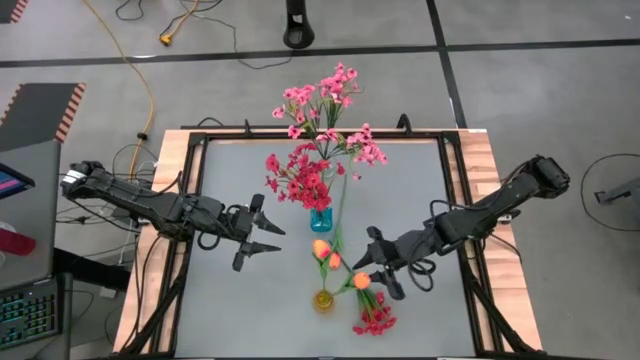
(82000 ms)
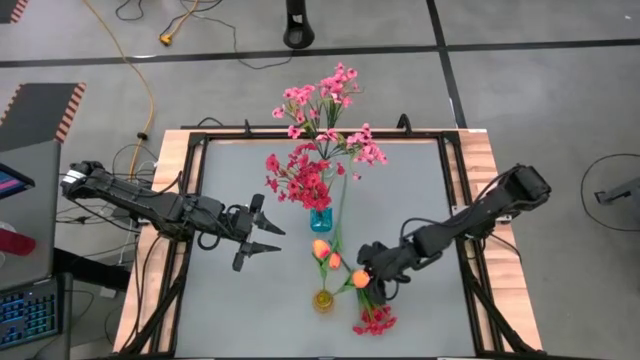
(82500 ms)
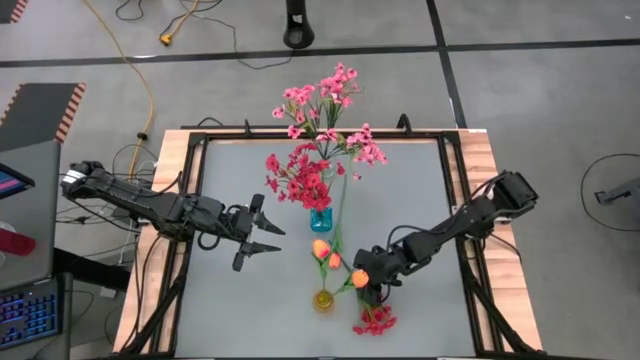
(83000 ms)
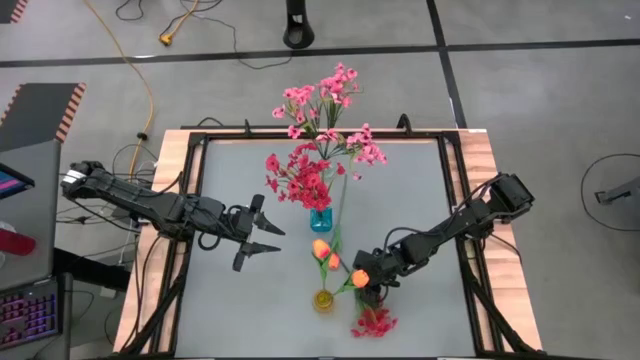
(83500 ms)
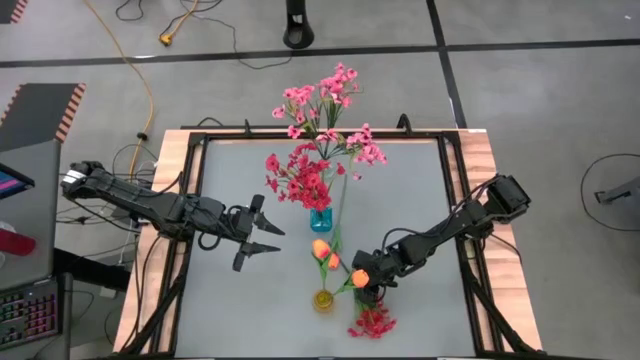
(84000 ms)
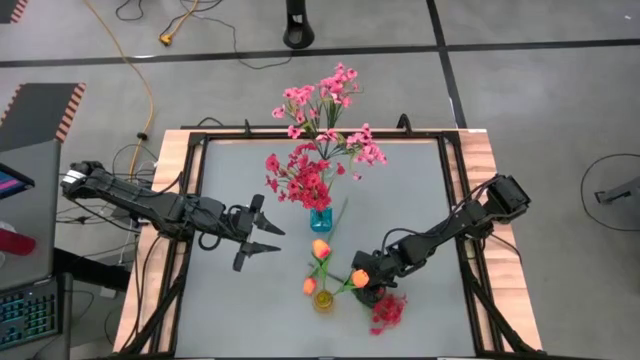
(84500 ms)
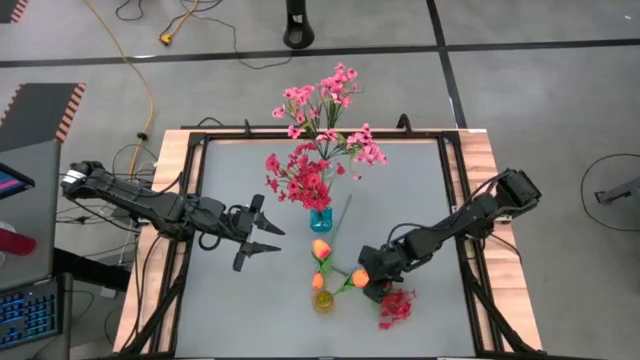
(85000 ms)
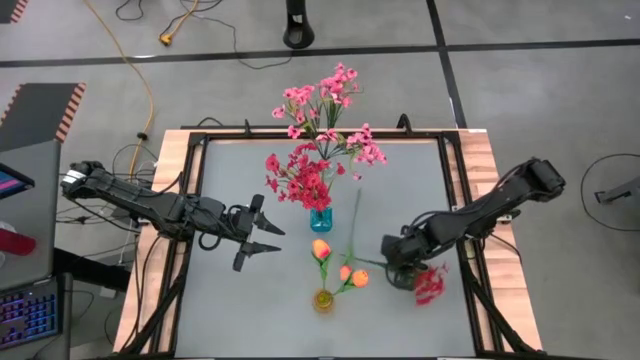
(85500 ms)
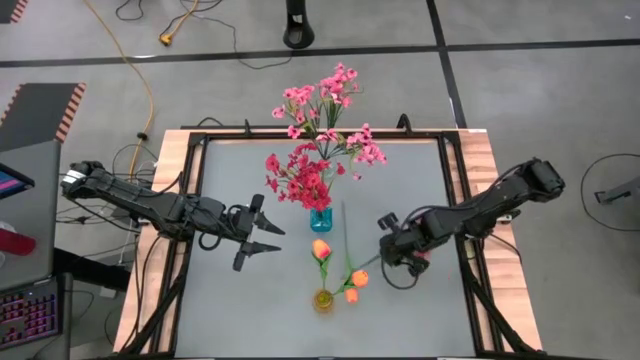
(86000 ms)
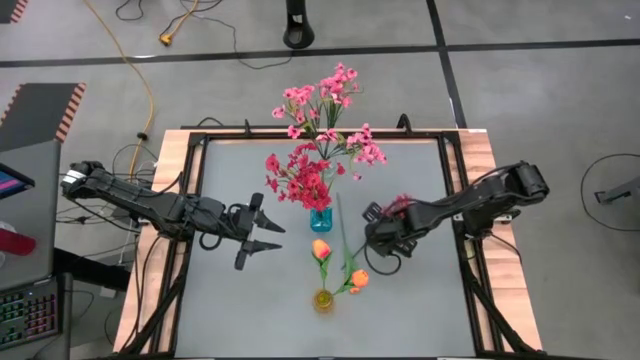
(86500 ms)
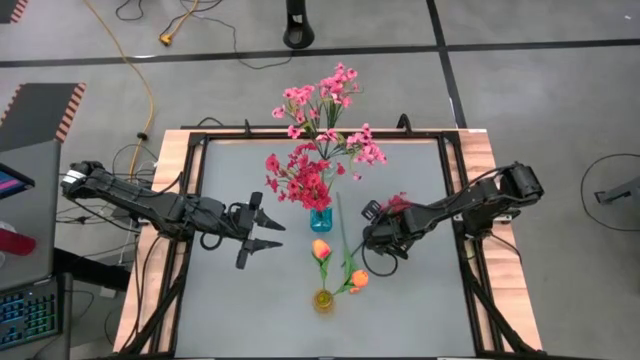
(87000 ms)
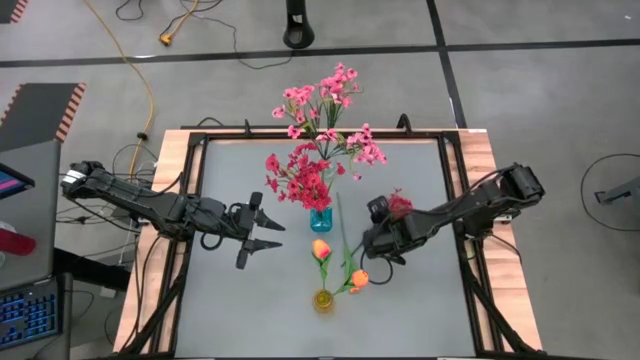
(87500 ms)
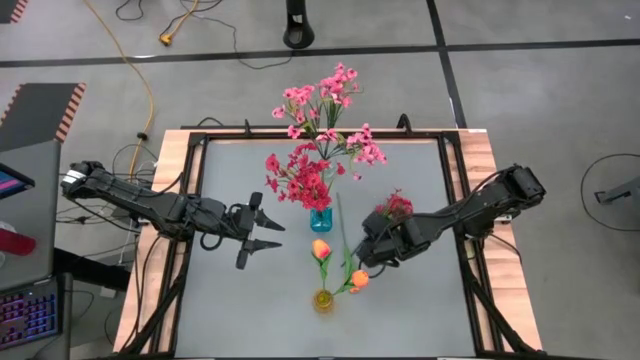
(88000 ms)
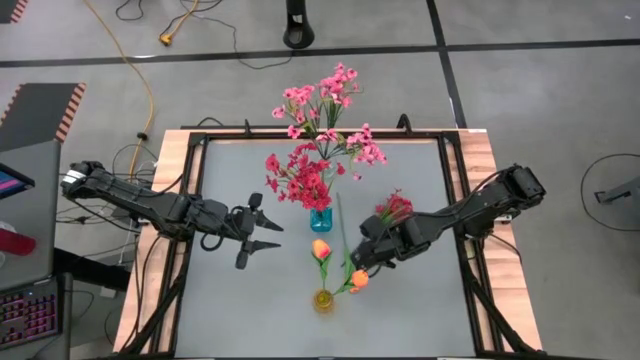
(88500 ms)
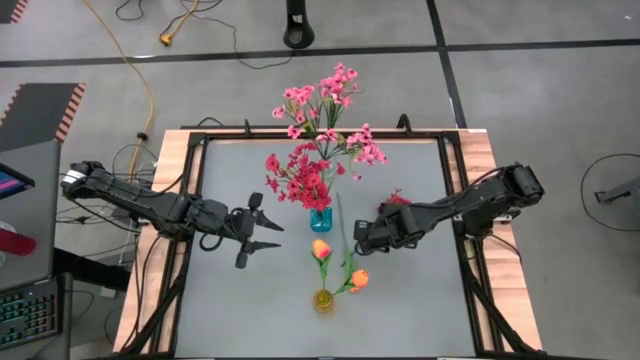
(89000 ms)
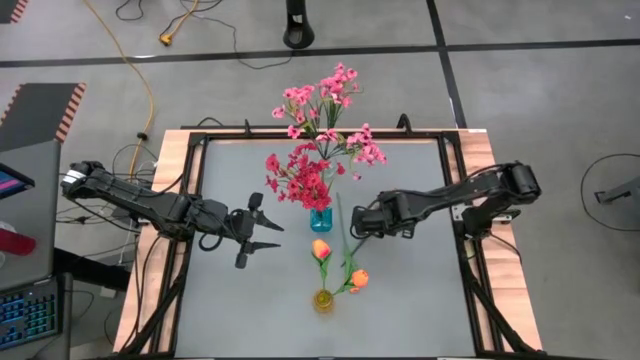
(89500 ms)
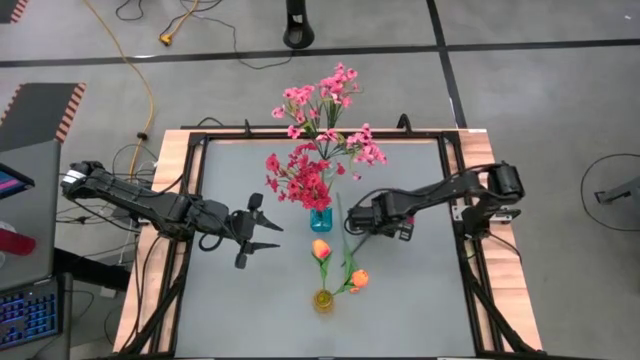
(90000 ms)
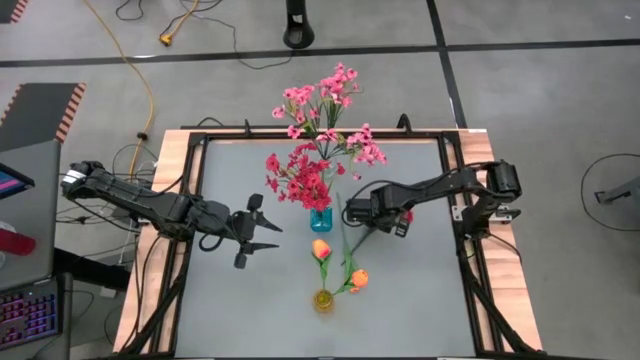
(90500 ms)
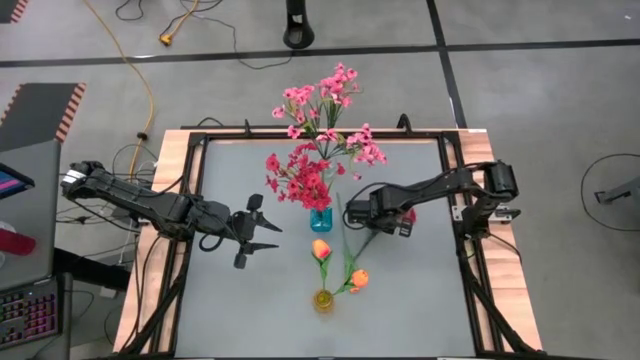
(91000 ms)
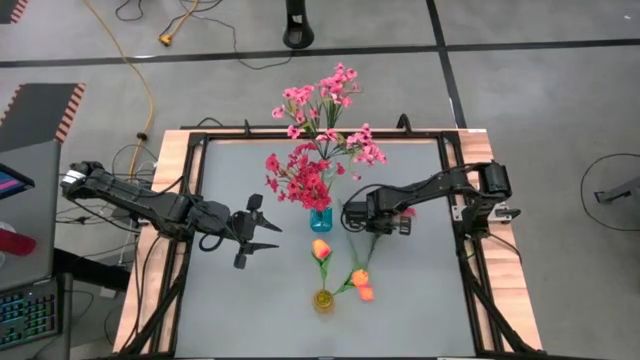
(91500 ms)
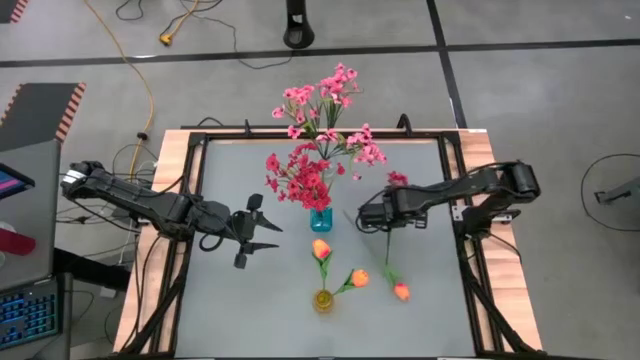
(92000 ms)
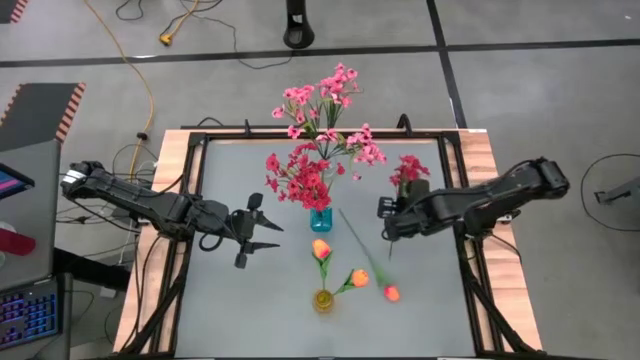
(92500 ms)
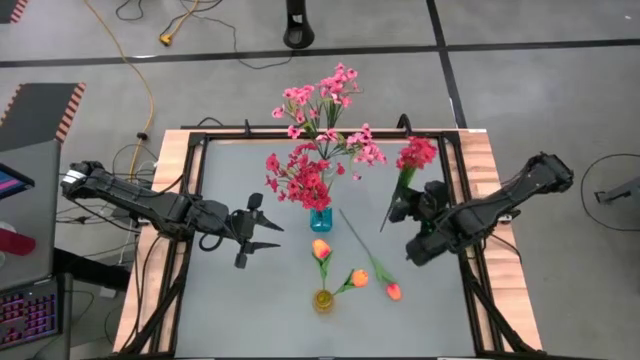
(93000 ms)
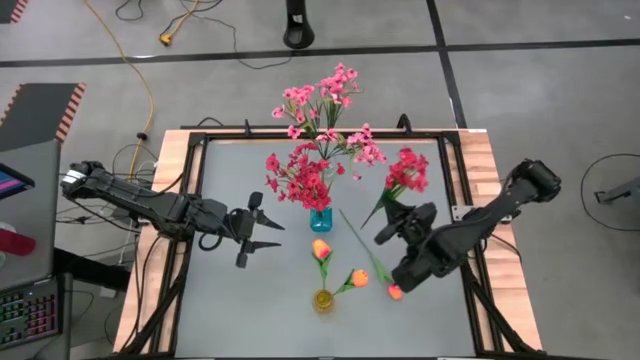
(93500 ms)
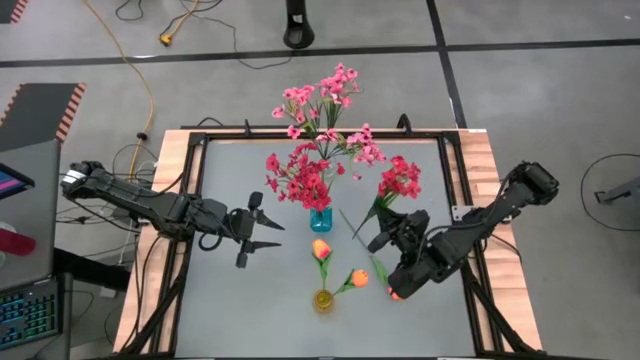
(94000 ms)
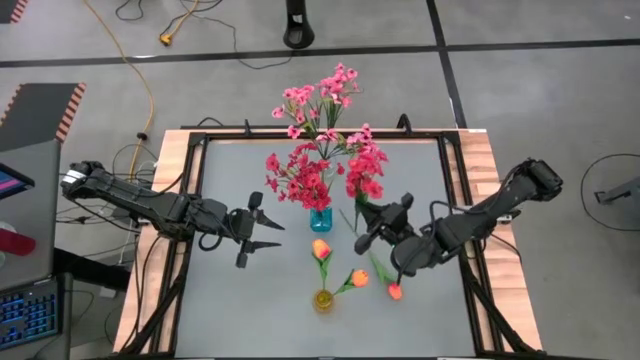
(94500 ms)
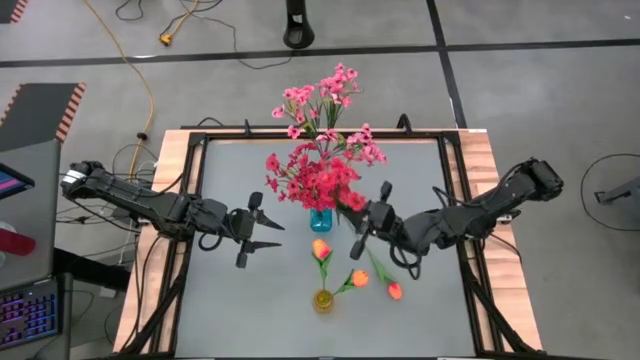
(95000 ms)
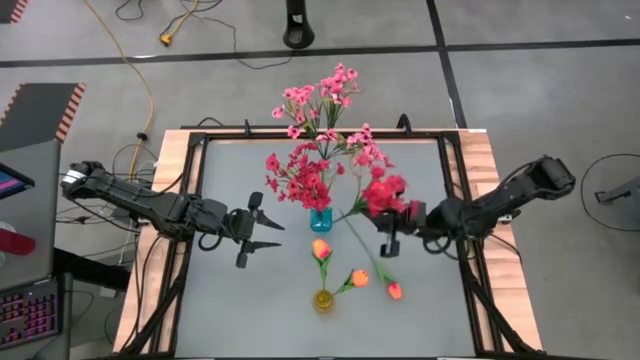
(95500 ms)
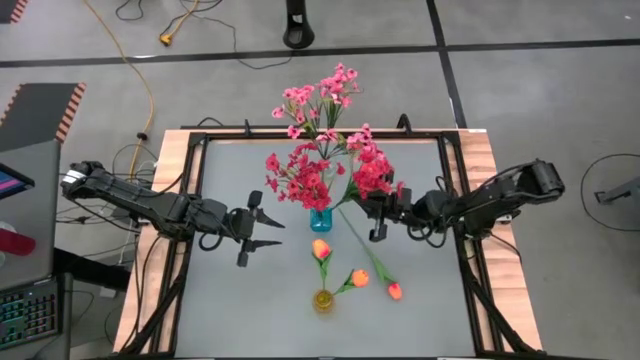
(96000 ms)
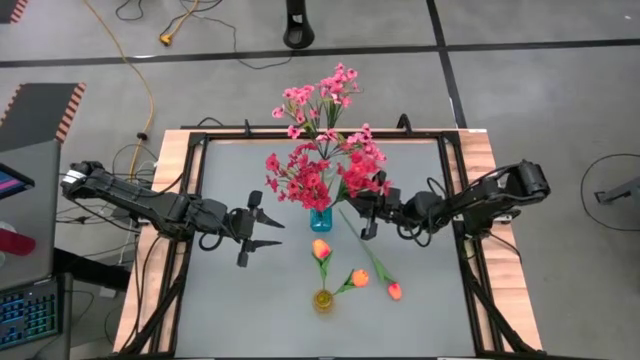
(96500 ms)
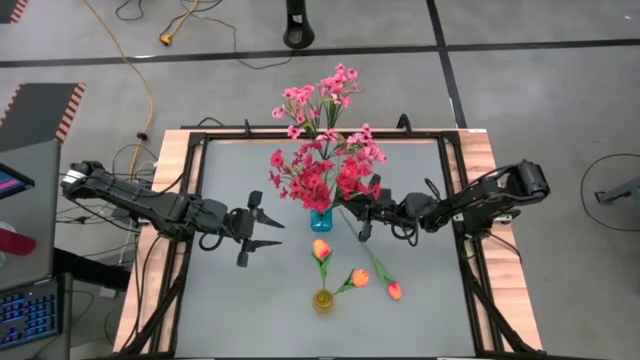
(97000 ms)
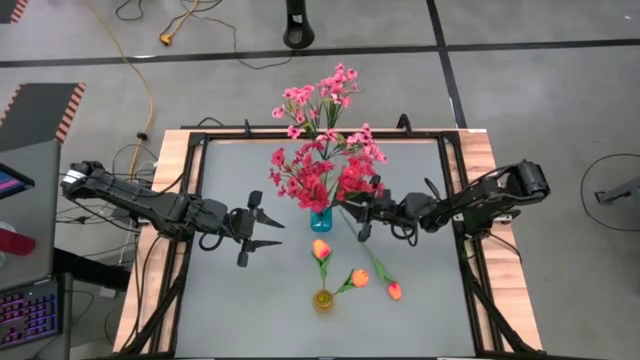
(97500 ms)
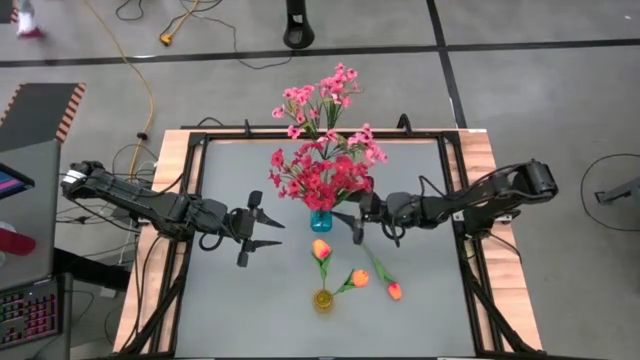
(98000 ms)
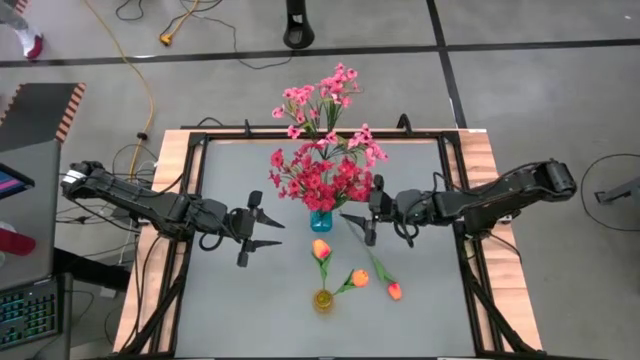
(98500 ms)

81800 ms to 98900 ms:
Task: Sort flowers into vase by color
Put the red flowers into the blue vase

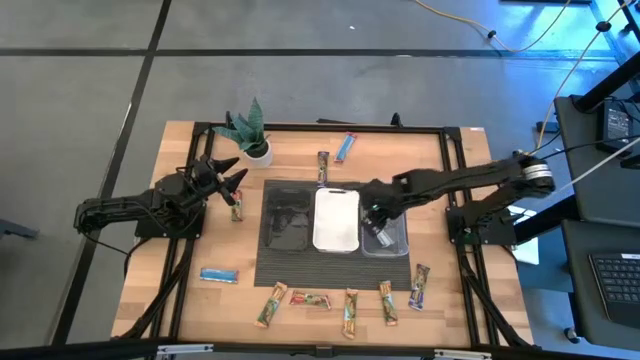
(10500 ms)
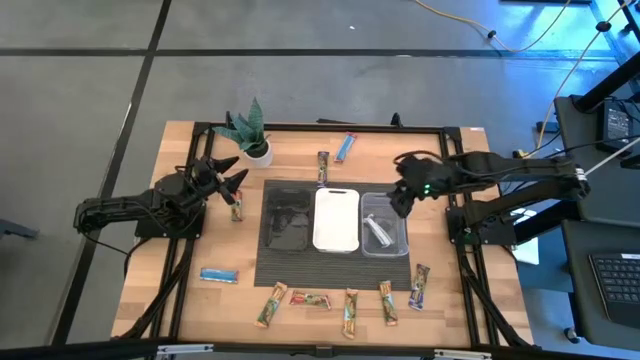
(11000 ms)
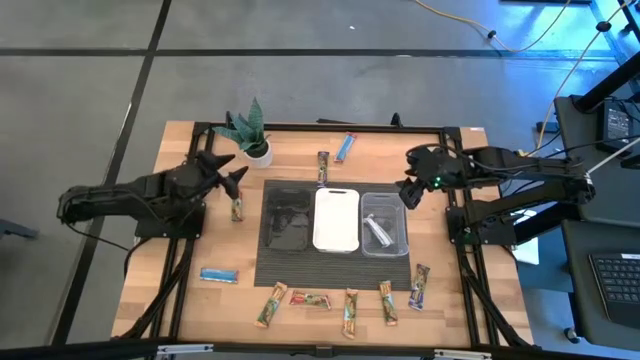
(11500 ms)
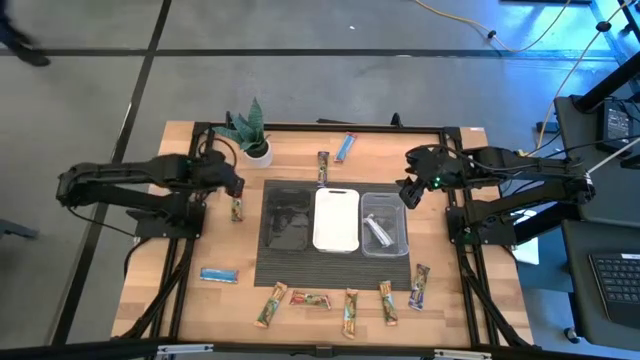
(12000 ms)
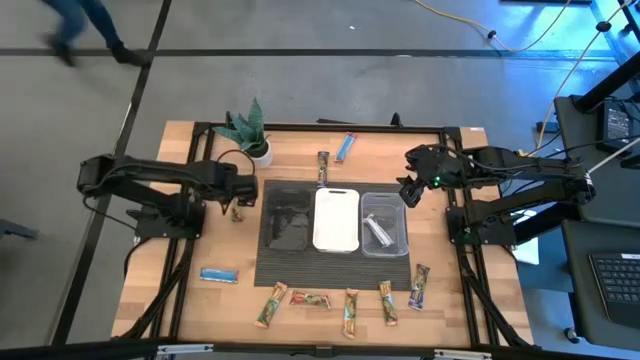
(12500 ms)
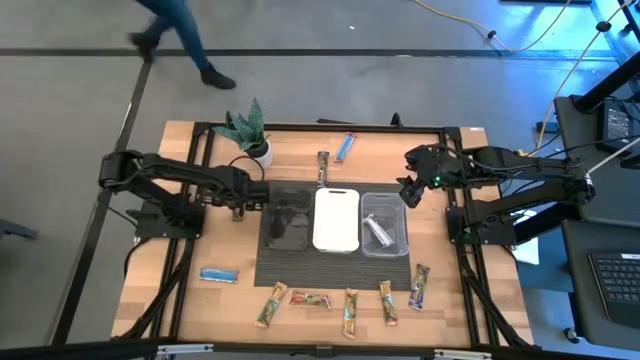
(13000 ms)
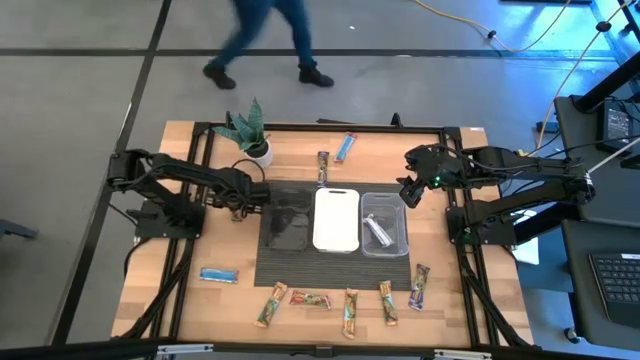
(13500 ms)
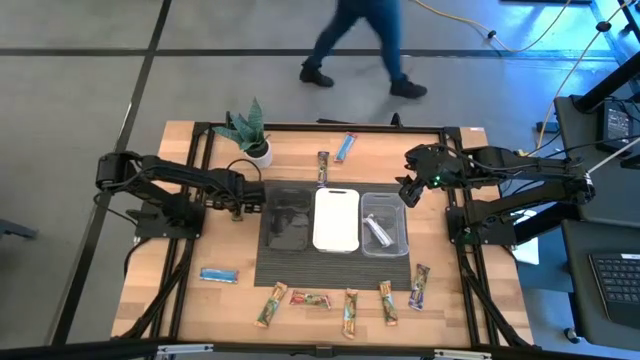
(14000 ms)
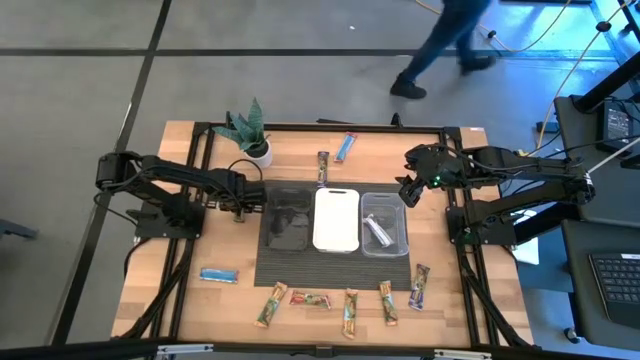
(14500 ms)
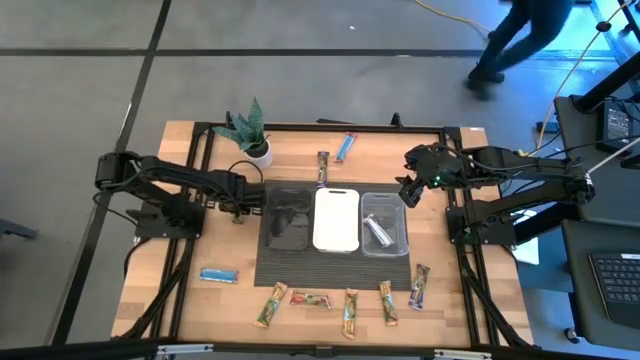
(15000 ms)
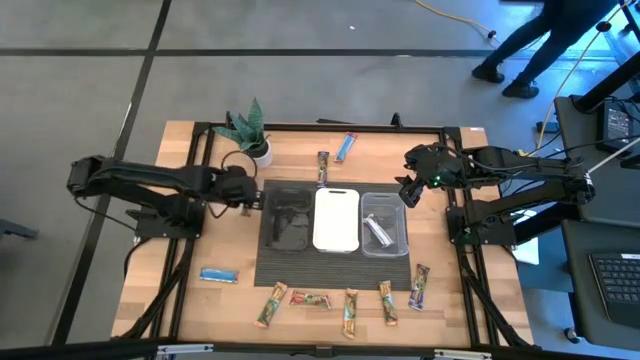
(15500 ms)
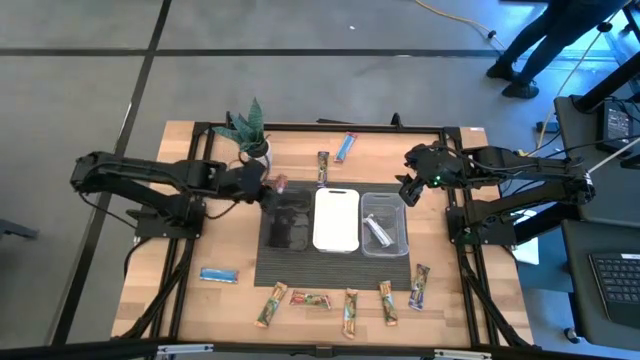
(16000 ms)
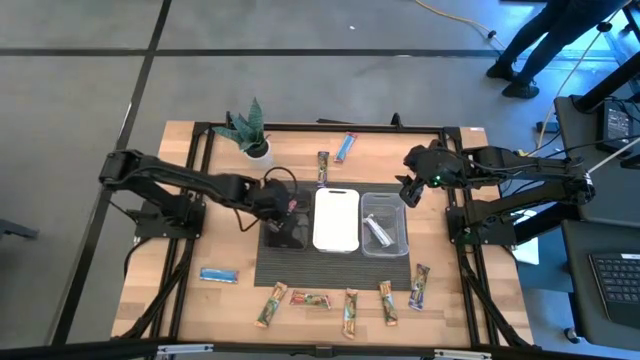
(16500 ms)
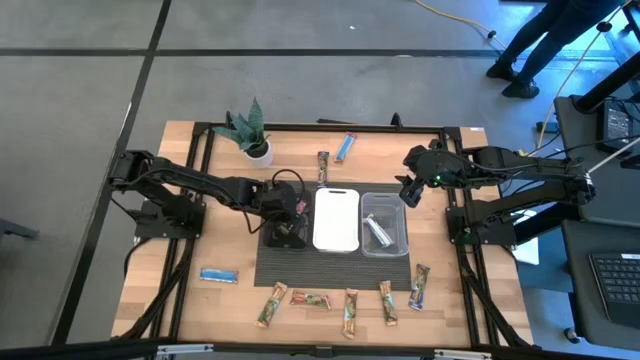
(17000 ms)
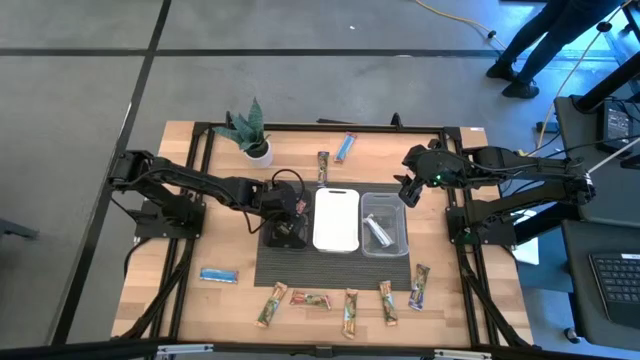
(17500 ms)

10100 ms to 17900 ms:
Task: Pick and place Granola Bars by type
Put the red granola bar into the black bin
